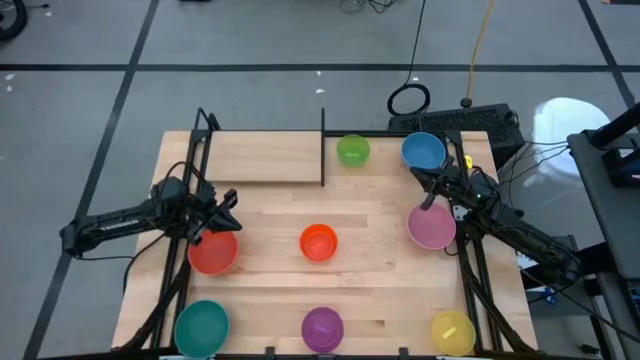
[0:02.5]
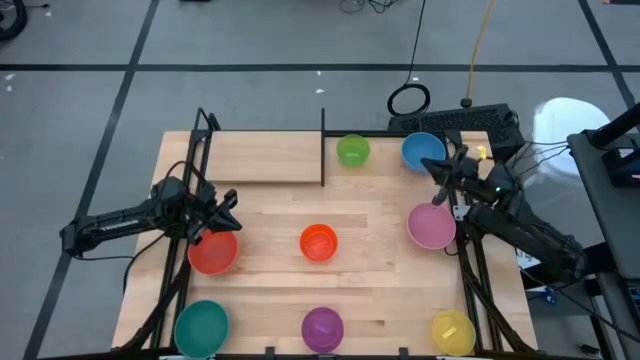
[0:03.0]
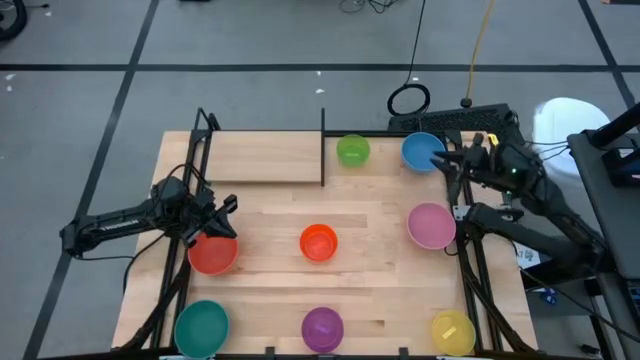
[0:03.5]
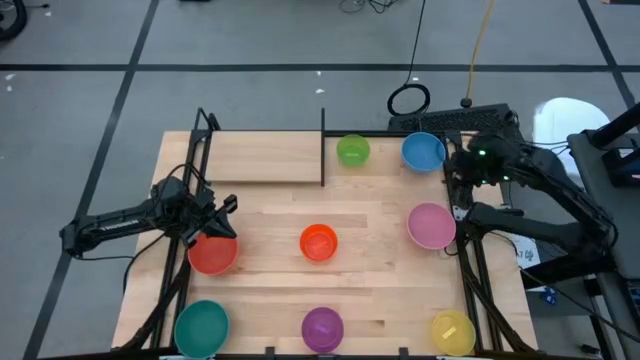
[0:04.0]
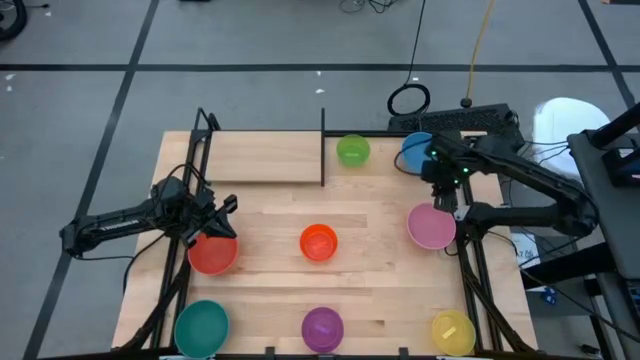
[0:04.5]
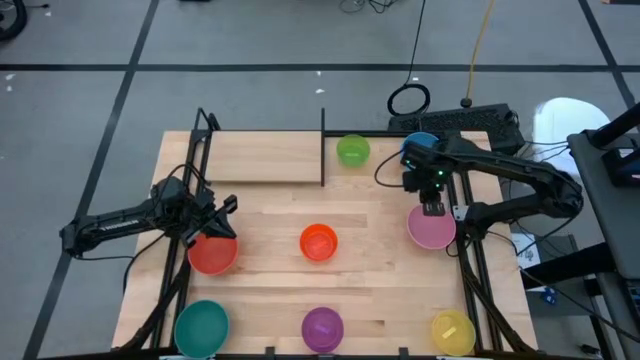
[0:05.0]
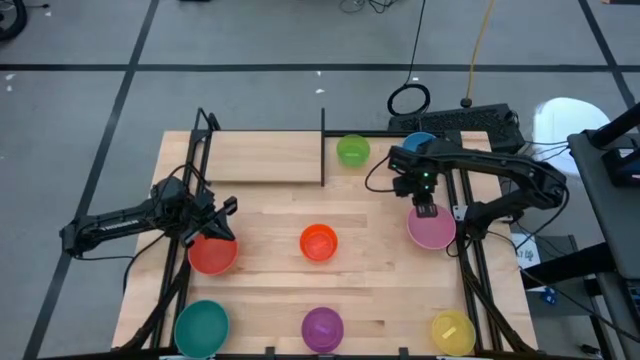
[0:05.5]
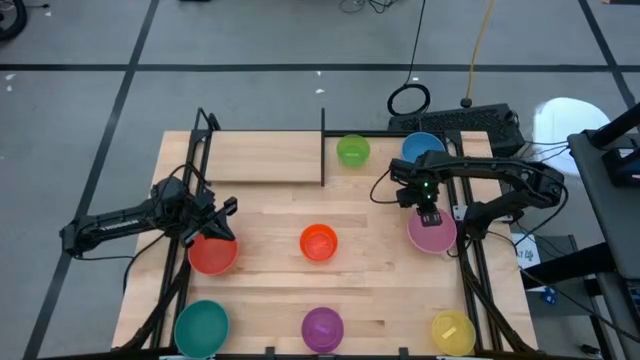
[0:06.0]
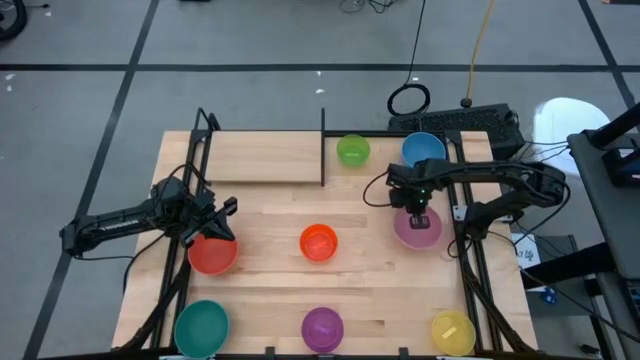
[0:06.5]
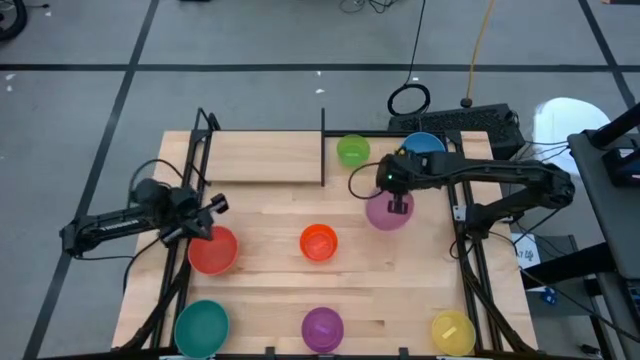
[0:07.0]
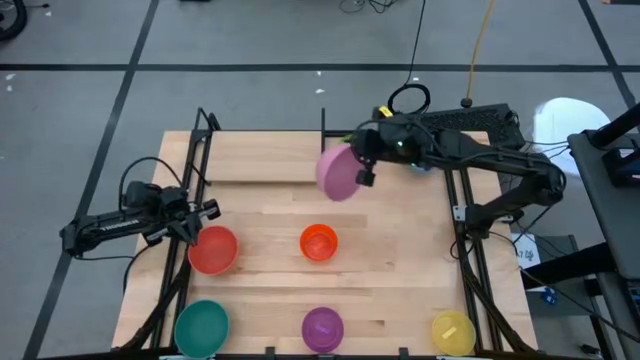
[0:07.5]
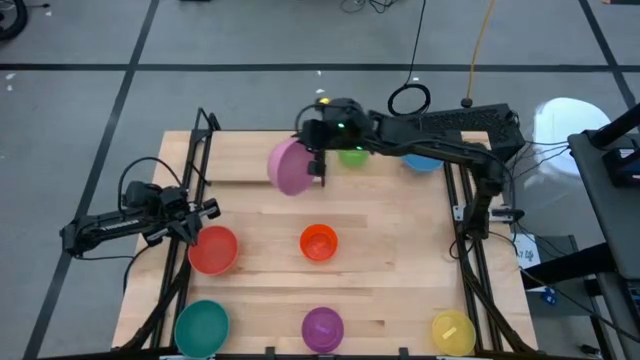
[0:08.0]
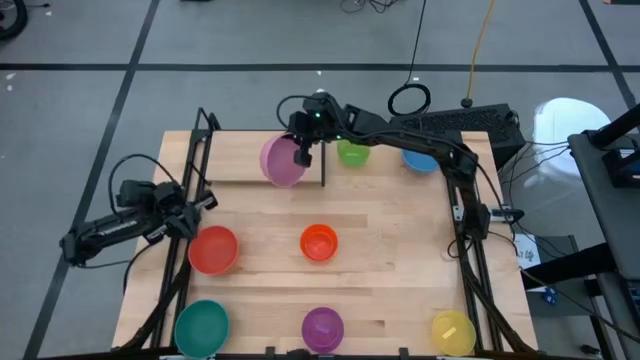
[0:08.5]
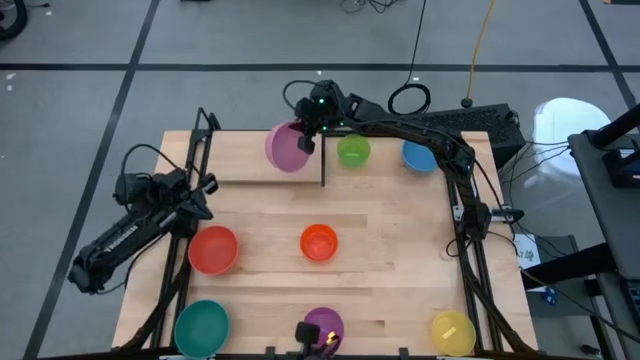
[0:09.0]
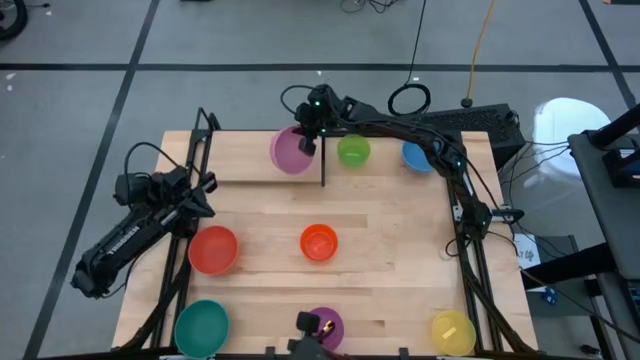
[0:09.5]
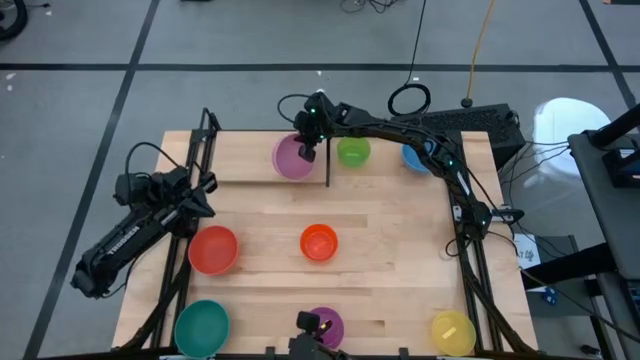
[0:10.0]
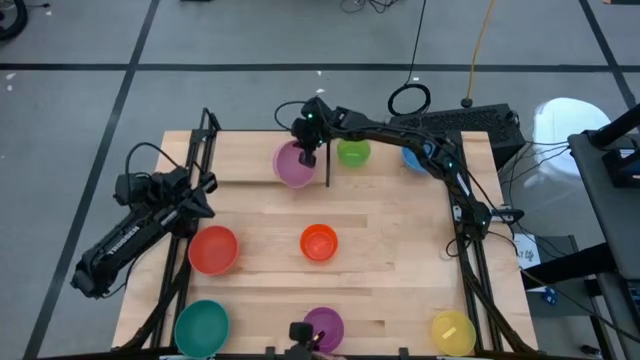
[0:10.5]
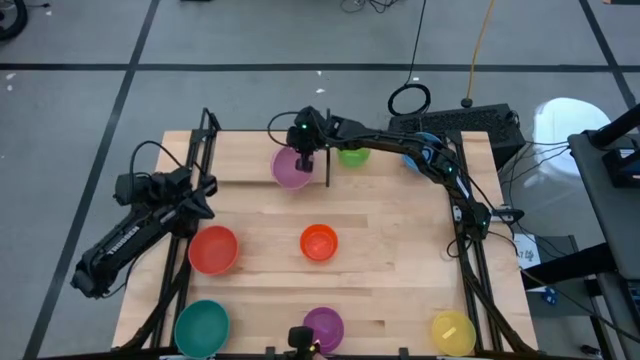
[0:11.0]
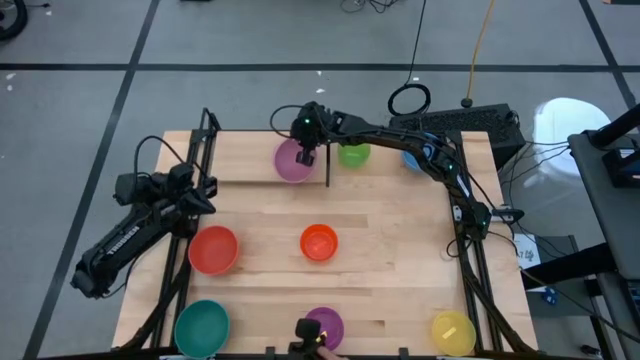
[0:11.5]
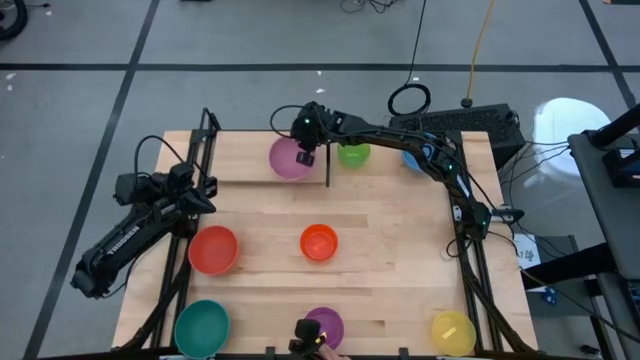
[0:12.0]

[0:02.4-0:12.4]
Task: Place and stack bowls onto a shelf
Put the pink bowl on the shelf

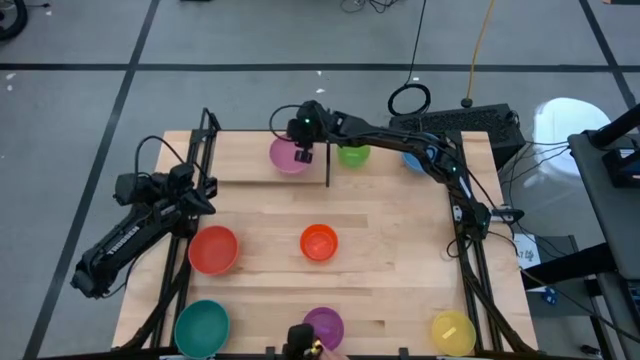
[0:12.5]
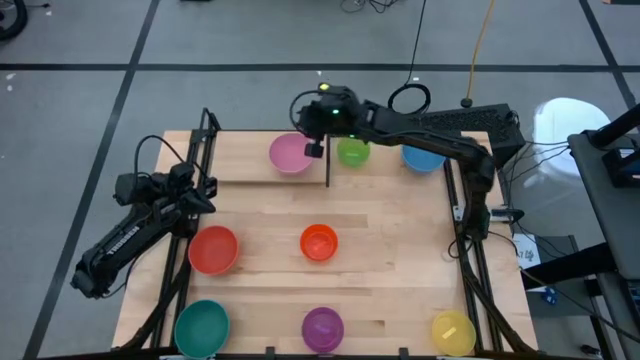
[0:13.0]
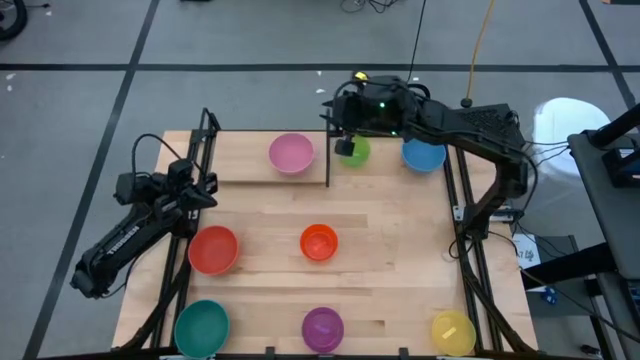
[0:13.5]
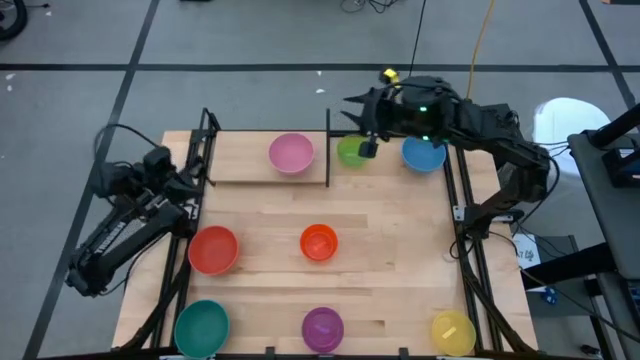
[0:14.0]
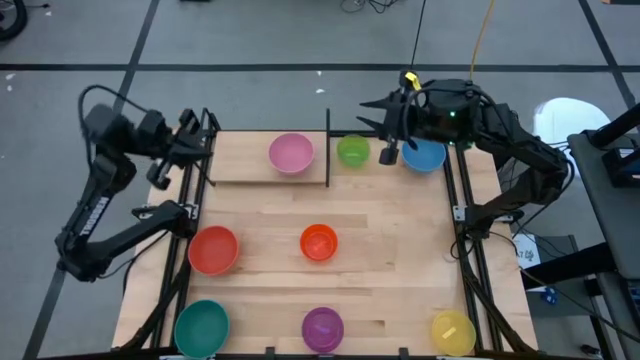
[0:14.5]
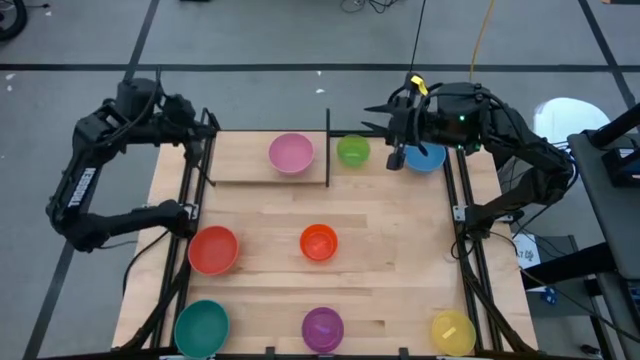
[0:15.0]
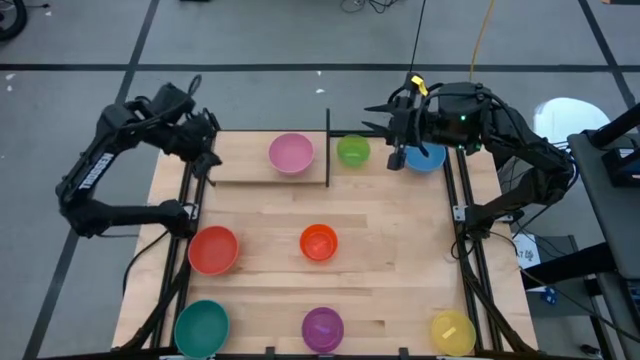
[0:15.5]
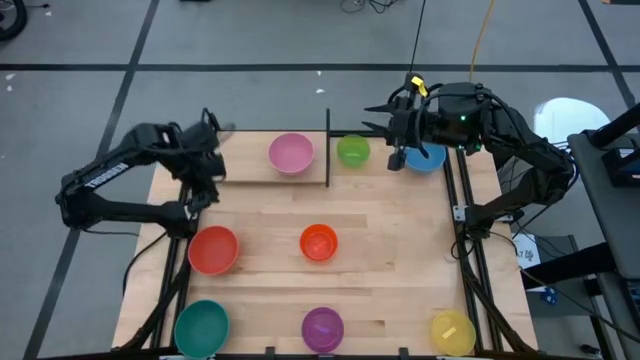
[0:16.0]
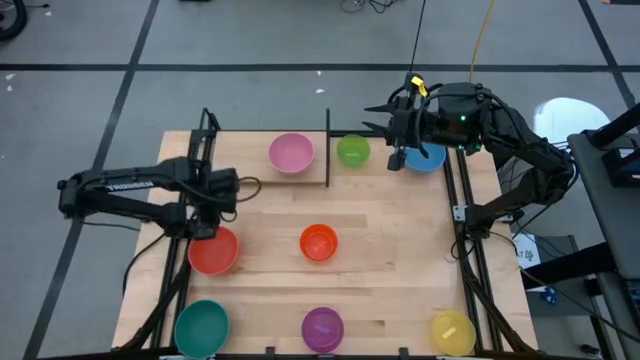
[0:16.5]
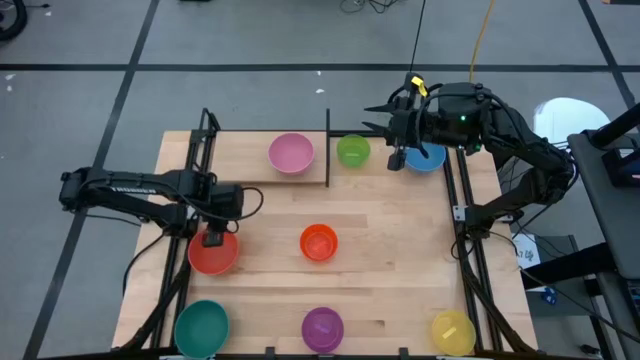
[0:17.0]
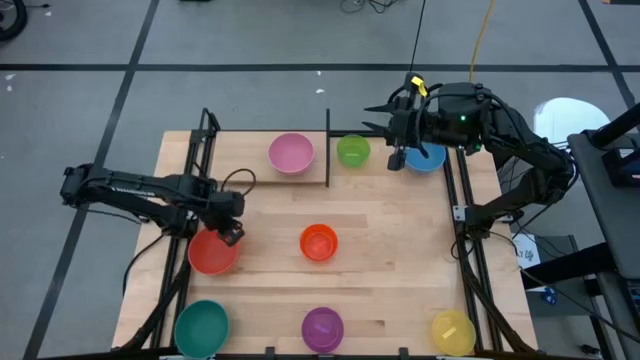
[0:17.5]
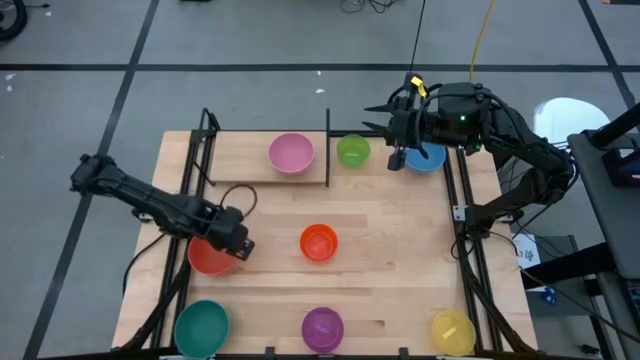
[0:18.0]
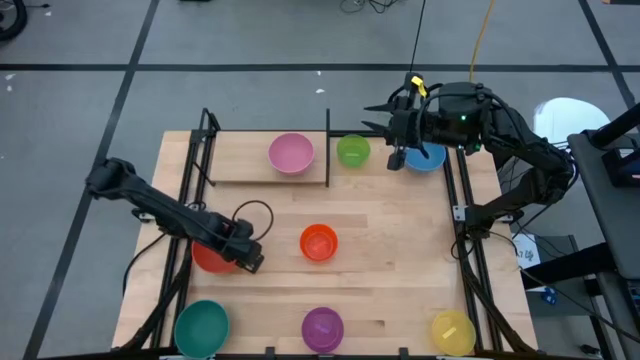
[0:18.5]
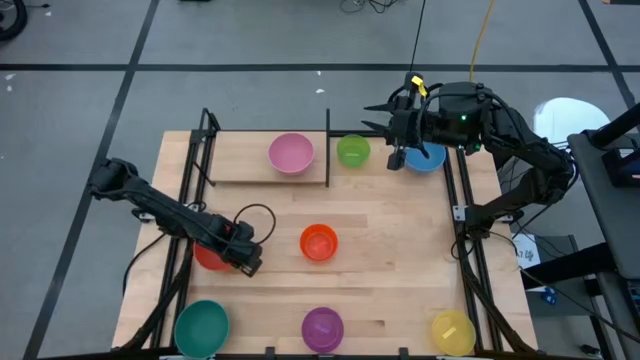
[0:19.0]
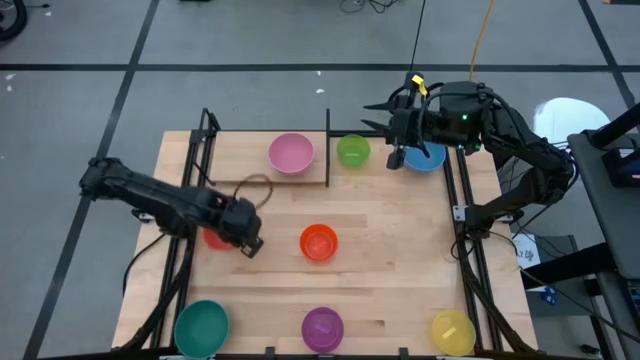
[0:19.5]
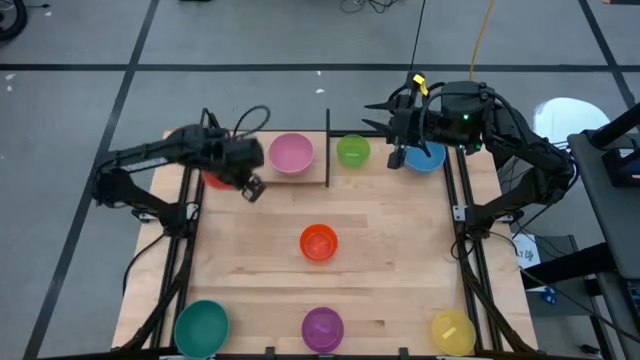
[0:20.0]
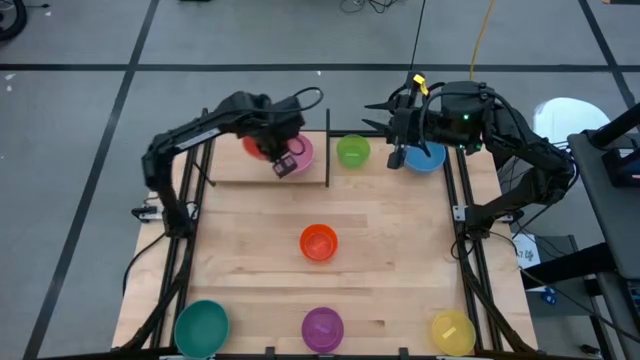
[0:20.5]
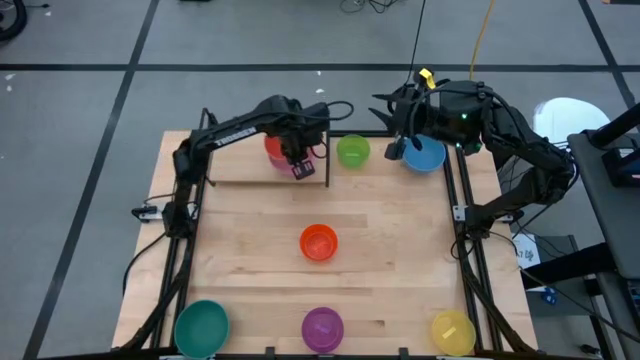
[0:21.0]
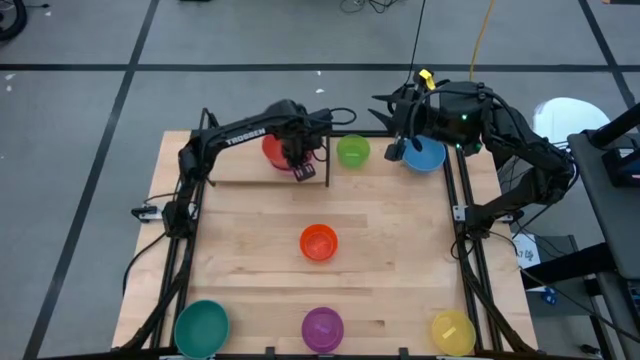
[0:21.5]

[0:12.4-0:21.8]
Stack the red bowl on the pink bowl on the shelf

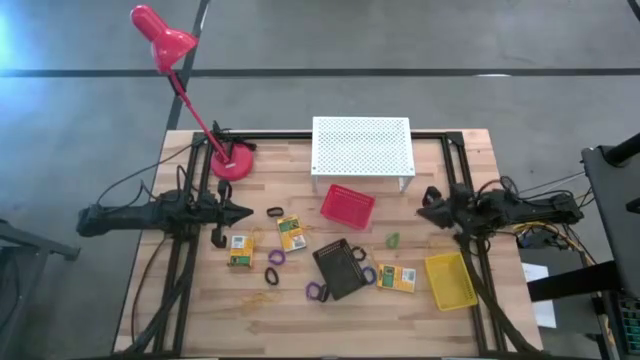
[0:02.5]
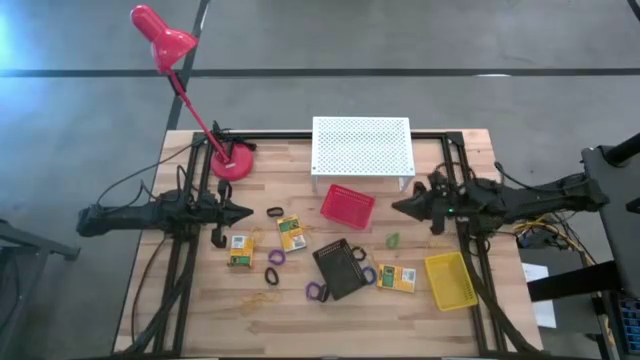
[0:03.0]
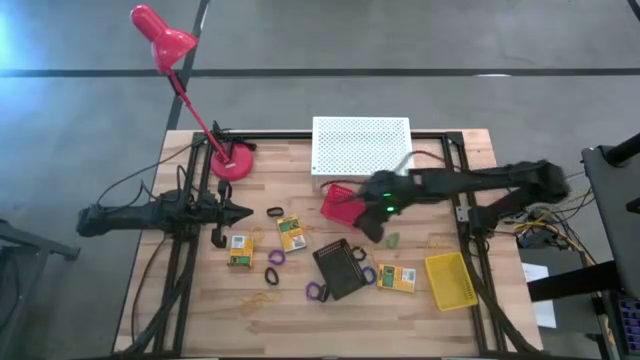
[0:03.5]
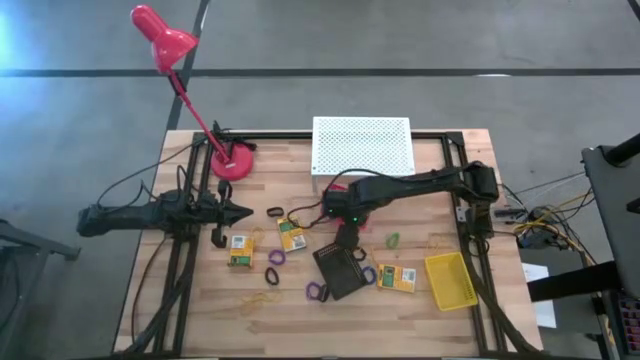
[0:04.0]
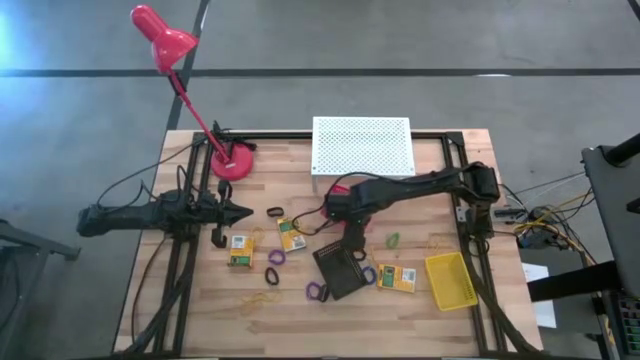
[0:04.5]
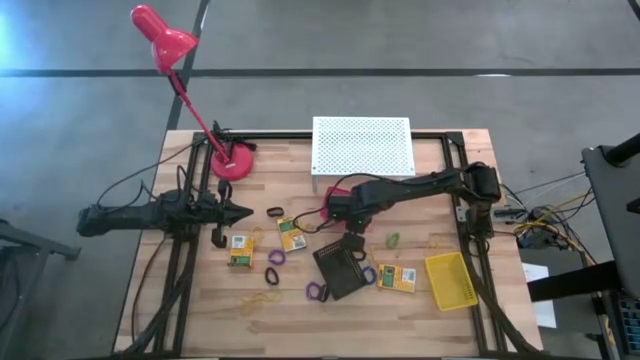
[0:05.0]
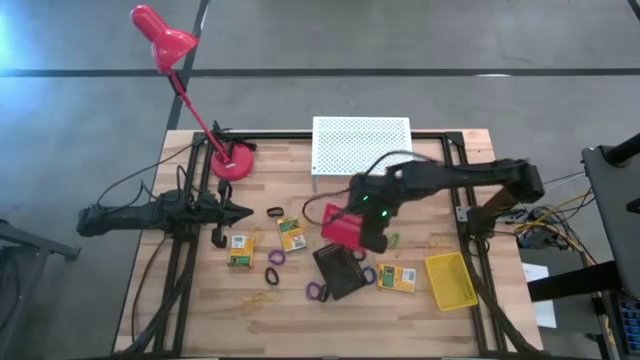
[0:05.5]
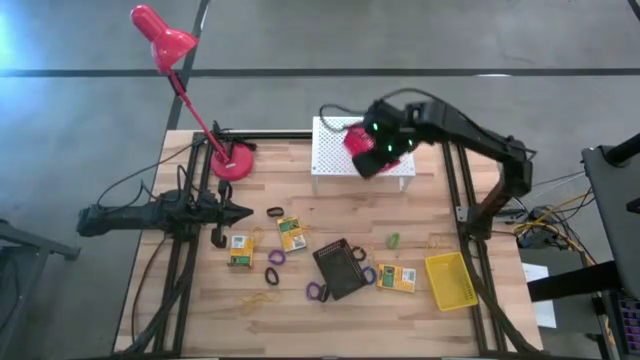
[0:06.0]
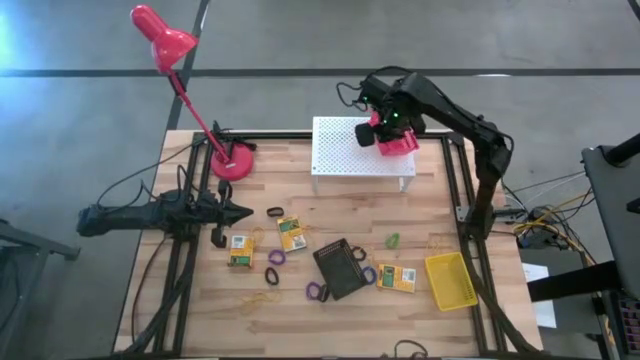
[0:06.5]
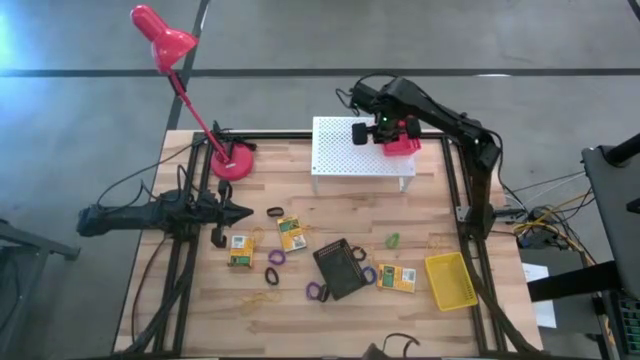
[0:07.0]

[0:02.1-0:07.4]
Task: Pick & Place Office Desk Supplies
Put the red bin on the shelf
